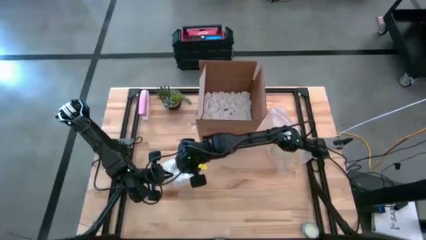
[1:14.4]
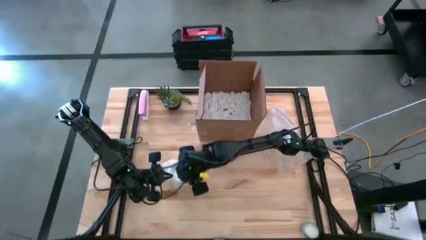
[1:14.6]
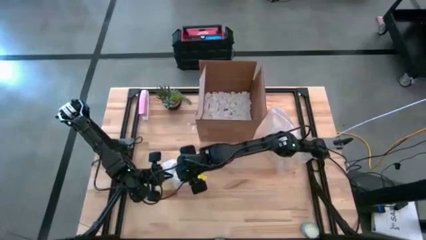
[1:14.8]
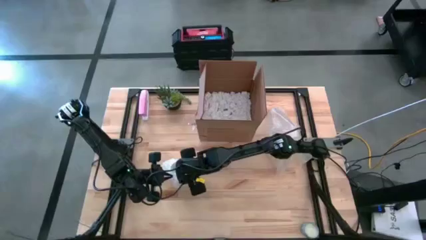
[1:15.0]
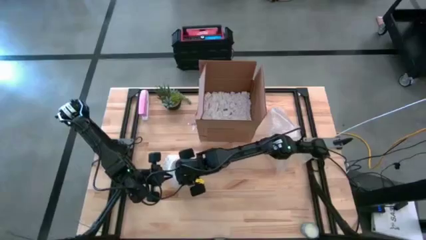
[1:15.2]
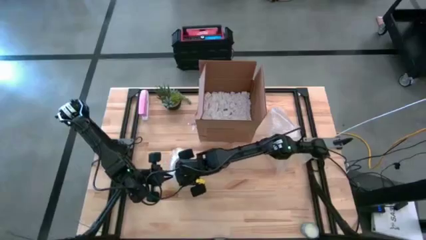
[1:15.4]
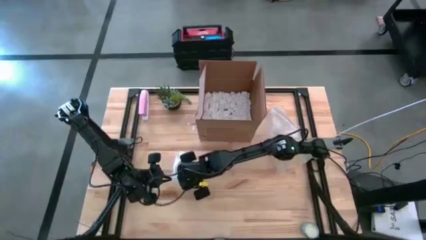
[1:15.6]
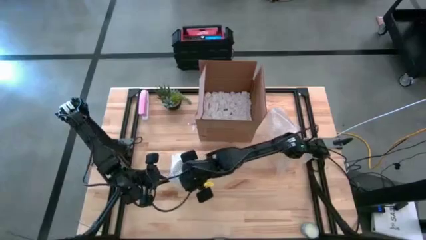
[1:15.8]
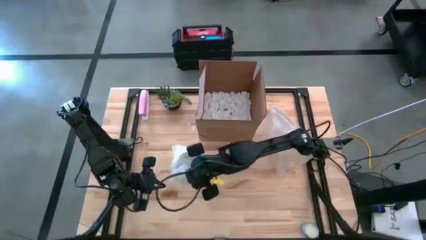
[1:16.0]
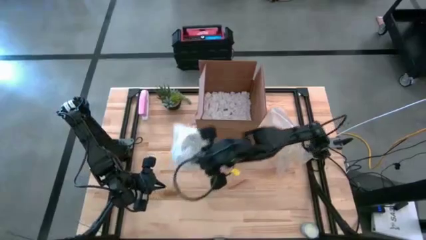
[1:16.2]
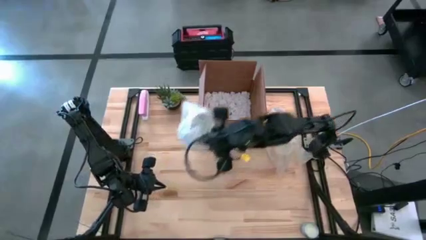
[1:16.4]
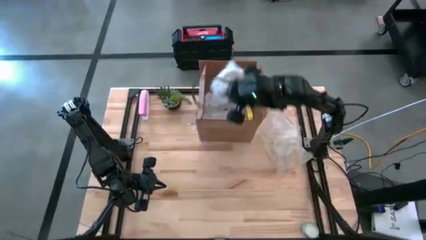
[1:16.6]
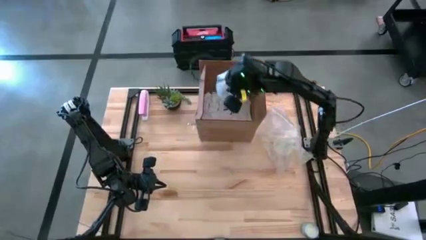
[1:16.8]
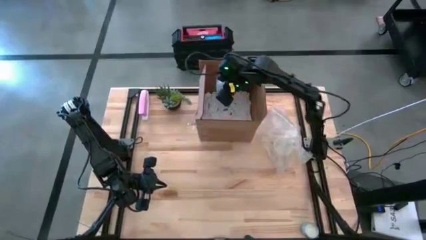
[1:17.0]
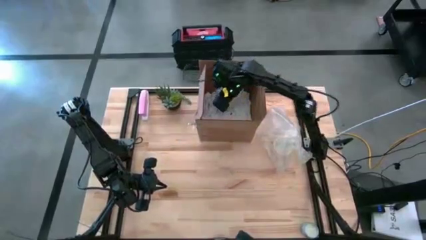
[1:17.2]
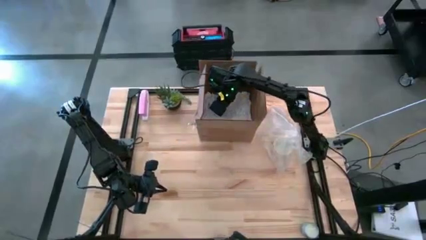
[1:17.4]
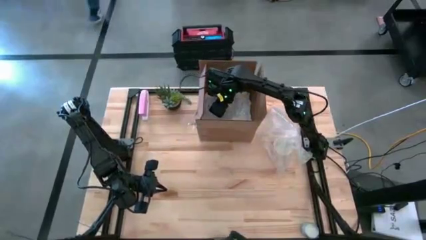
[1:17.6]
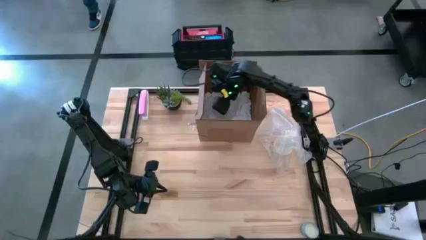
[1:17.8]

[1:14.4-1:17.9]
Task: wrap mug
Put the wrapped gray mug into the cardboard box

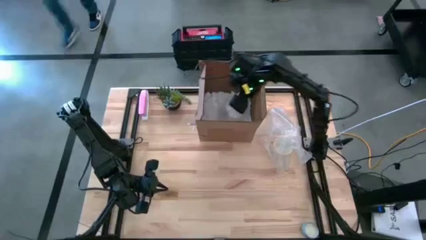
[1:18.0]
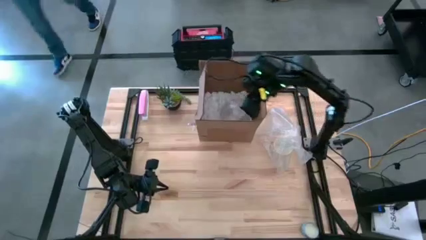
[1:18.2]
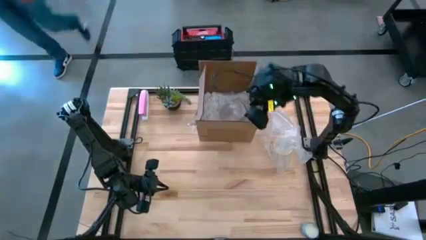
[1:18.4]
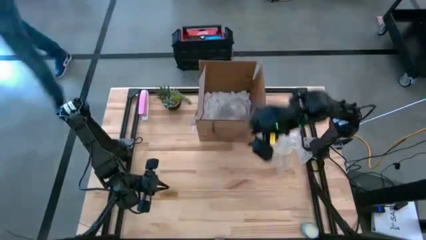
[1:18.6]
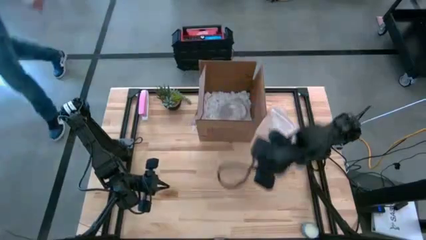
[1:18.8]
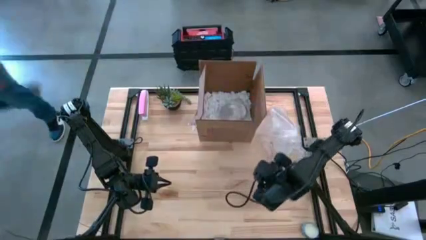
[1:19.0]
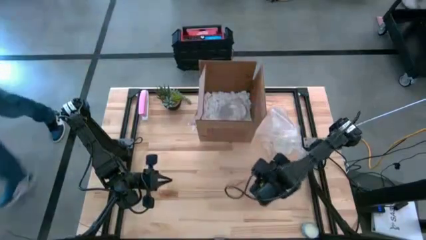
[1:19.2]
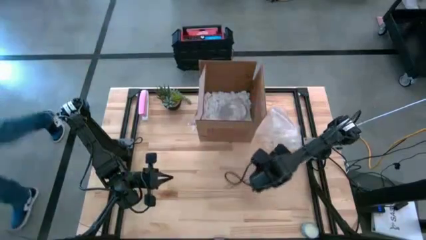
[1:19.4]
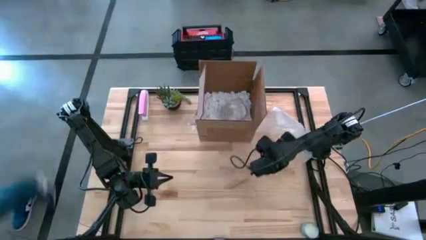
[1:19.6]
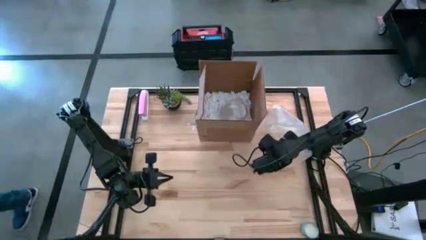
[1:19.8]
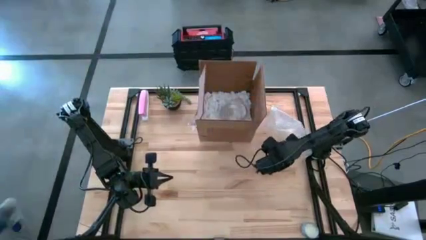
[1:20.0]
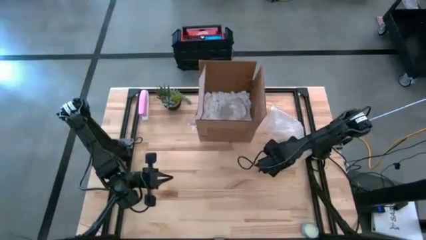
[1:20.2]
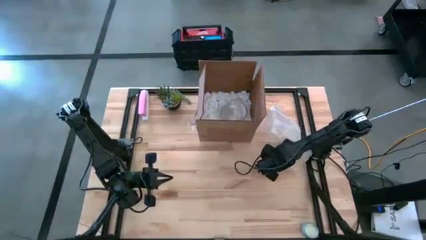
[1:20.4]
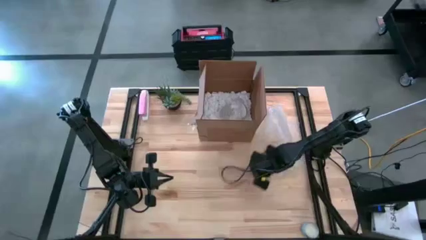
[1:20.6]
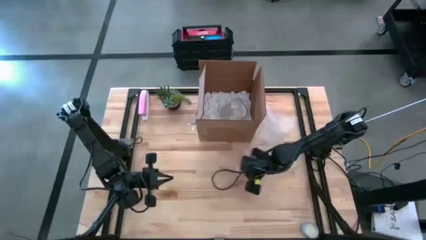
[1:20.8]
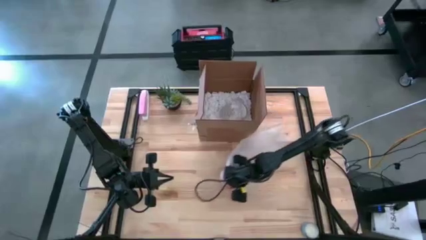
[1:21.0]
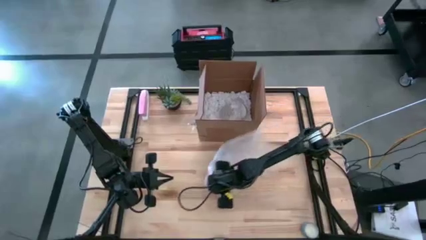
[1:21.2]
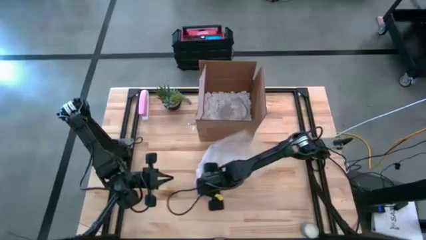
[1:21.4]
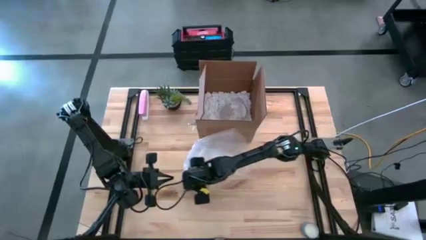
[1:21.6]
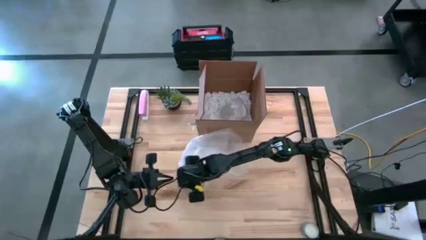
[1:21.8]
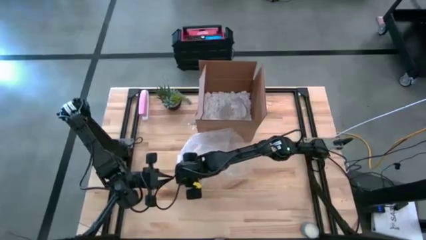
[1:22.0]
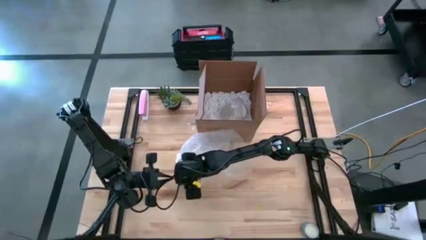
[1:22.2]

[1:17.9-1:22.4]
Move the orange mug to the center of the table

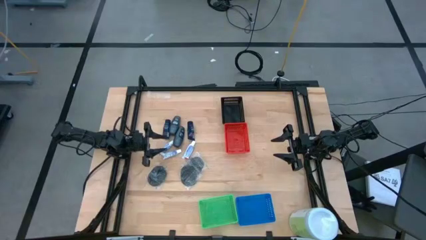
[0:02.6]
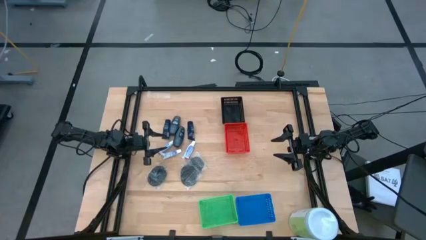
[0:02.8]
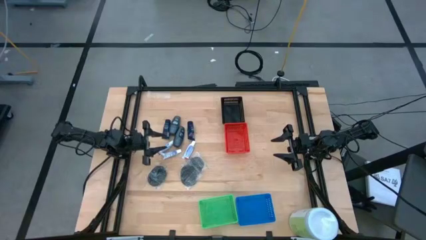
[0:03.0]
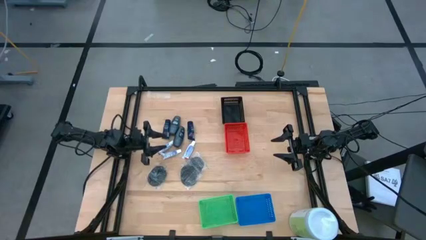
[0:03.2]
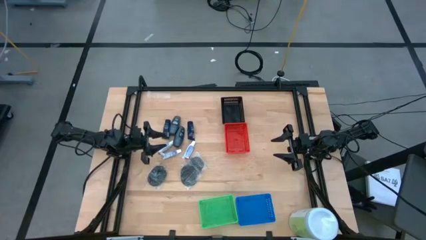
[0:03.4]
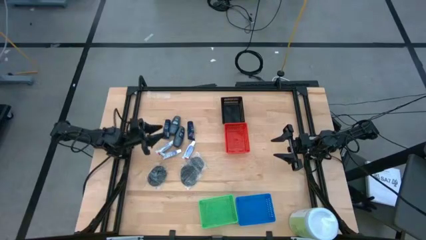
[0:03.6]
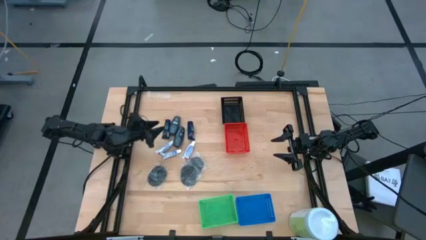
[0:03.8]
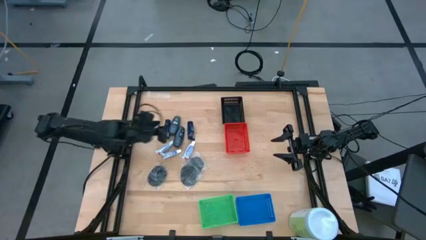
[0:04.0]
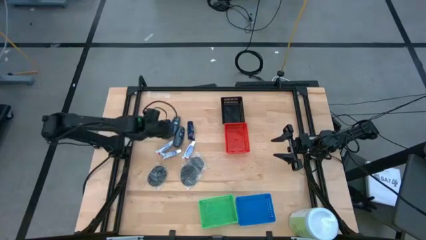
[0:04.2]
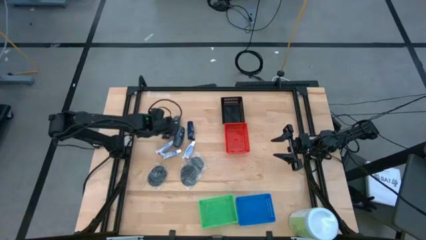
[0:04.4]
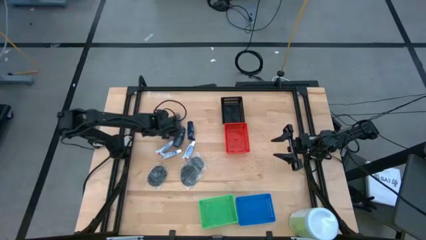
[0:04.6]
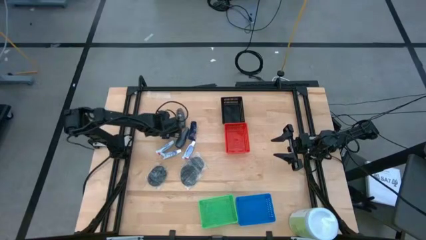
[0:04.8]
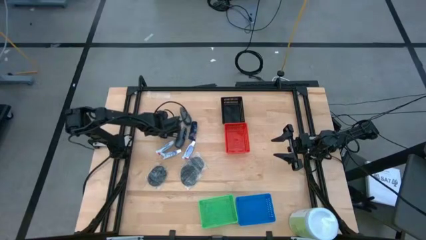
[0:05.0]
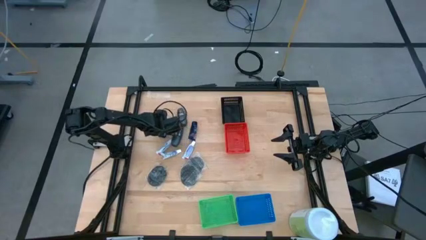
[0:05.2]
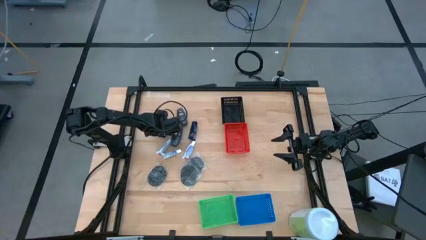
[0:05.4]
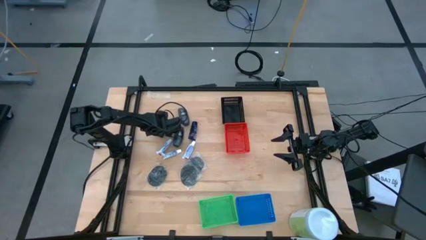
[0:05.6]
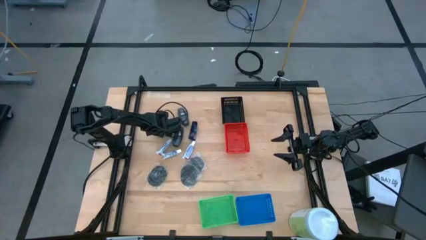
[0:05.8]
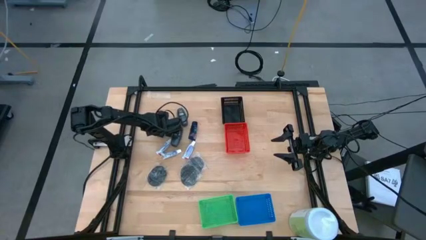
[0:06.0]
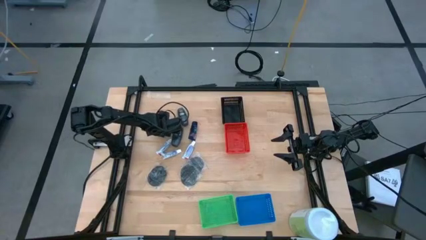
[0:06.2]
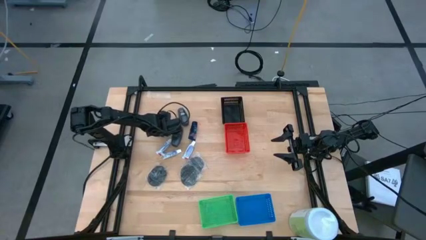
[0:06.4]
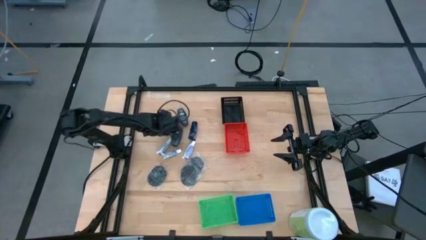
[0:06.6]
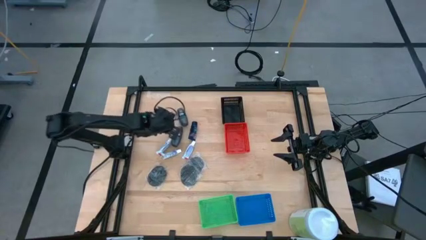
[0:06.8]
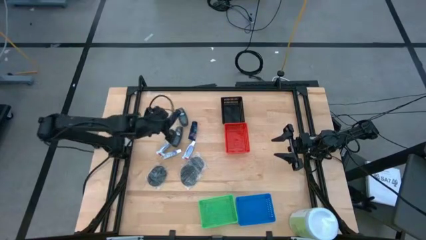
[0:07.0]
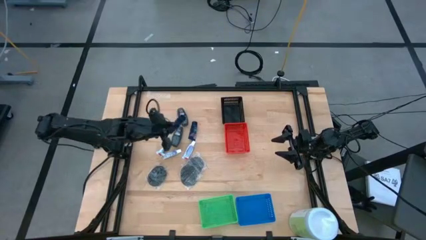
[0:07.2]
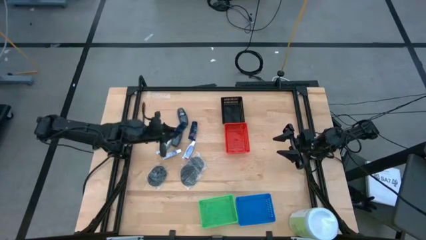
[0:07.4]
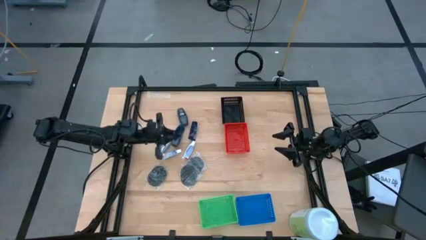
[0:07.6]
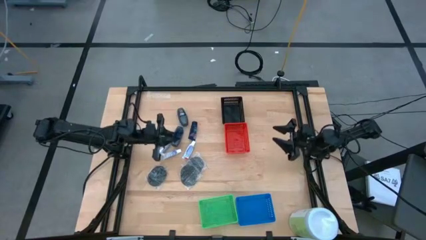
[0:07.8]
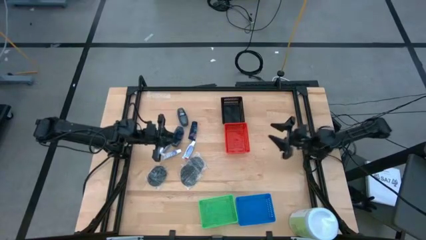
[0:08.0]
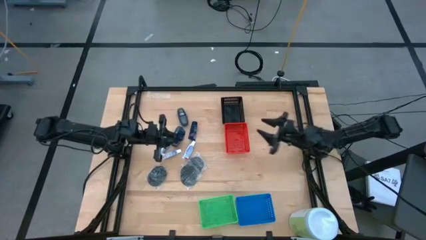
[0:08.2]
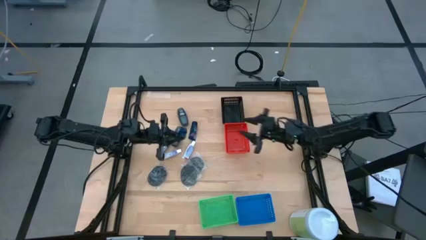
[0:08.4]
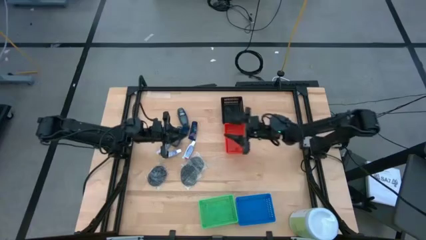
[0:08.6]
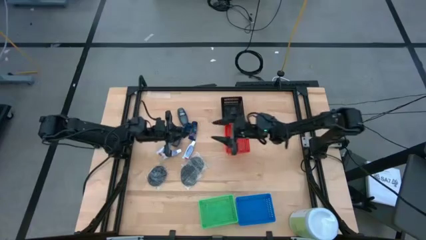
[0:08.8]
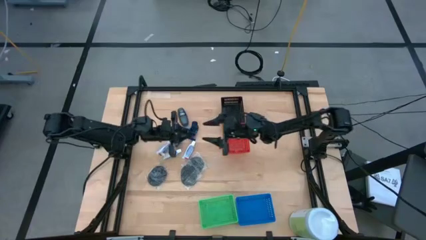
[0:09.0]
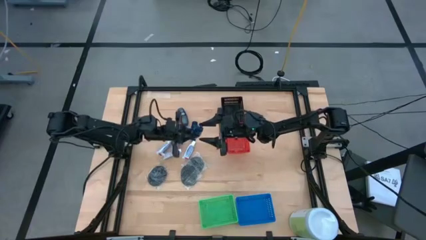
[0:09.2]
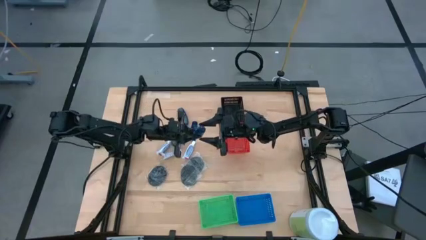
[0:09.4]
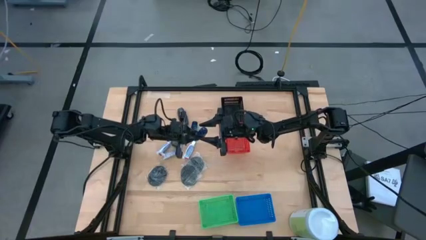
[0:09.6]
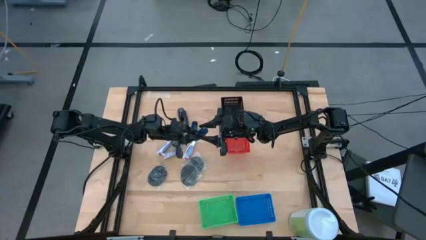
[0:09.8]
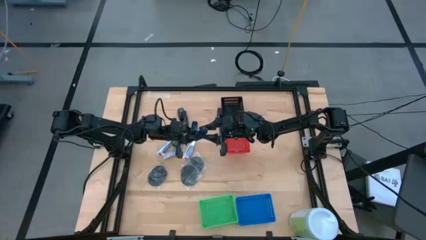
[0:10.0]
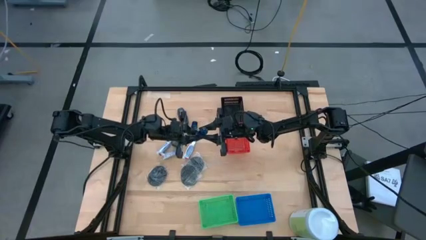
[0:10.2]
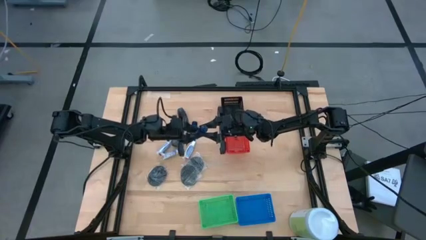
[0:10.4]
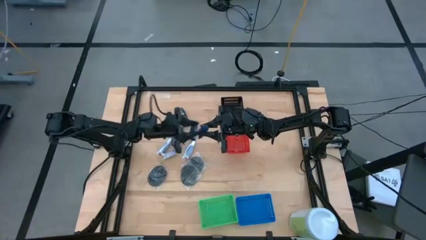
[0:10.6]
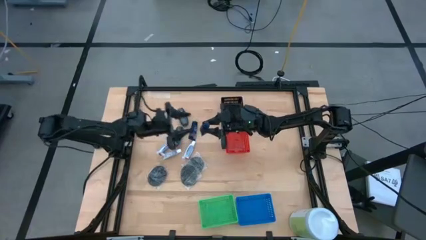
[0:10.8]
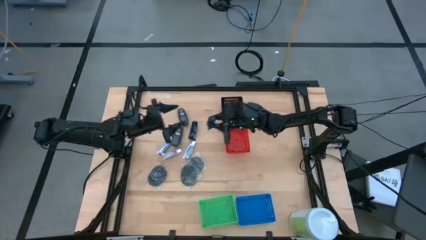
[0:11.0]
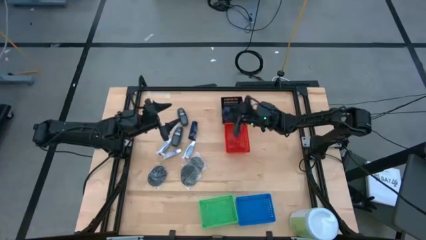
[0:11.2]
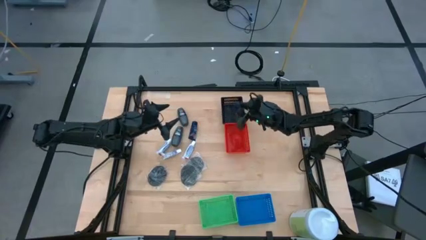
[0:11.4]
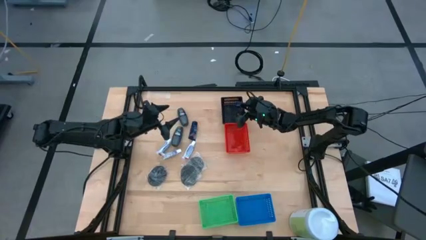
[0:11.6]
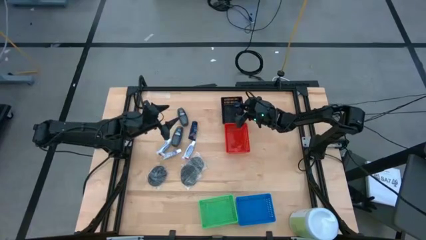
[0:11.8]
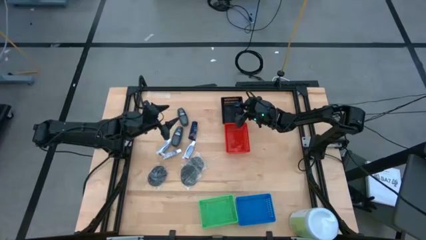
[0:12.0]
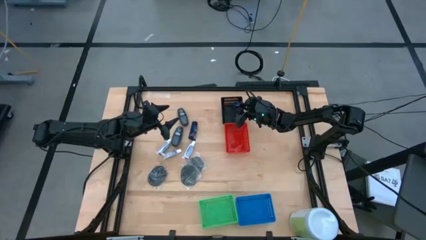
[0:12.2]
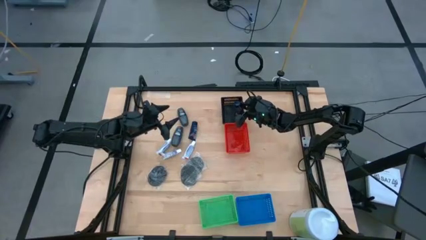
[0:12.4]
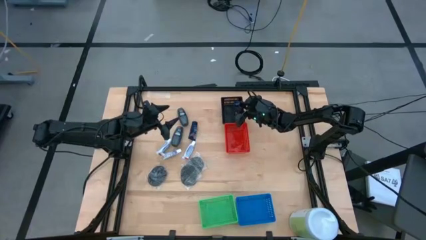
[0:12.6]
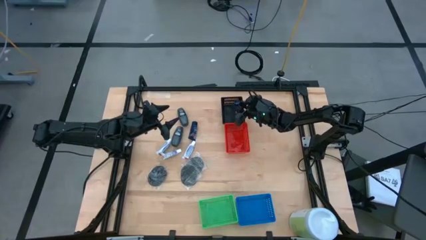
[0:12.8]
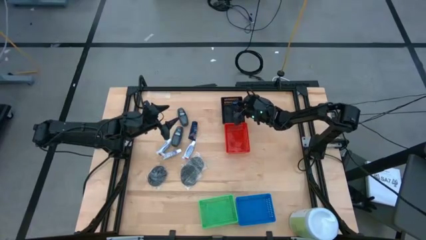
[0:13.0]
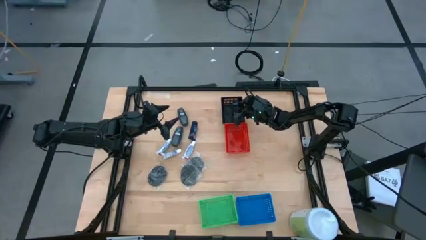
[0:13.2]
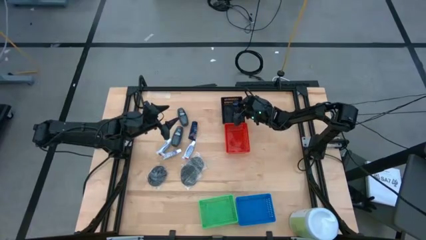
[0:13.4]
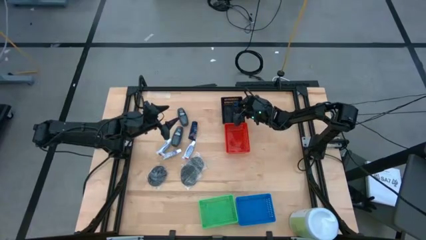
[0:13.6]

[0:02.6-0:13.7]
Task: Pick & Place Travel size toiletries
Put the left dark blue shave cream into the black bin
